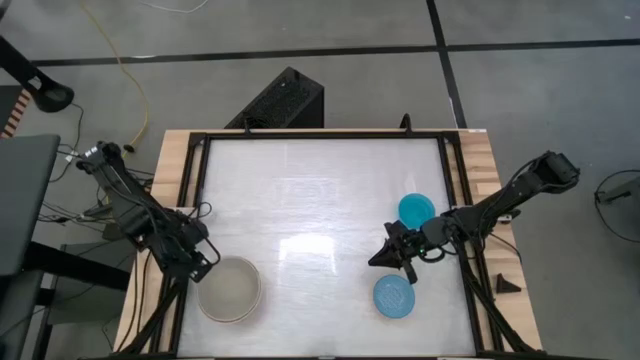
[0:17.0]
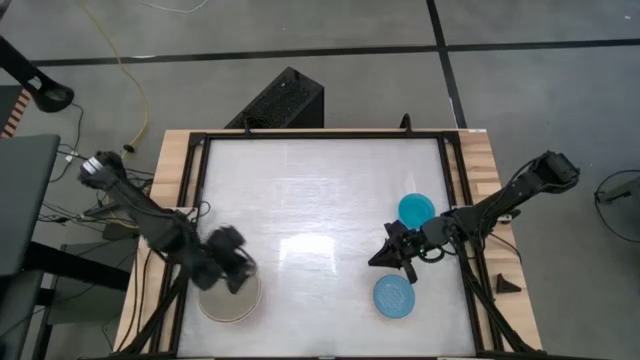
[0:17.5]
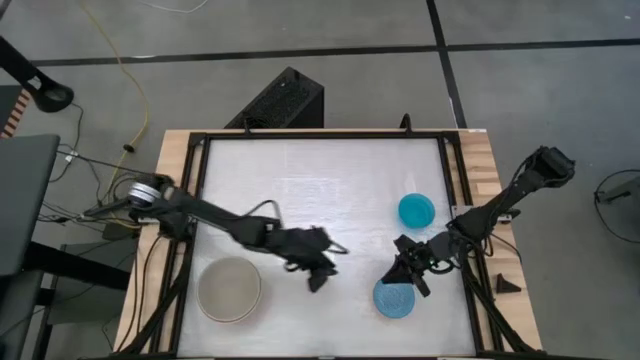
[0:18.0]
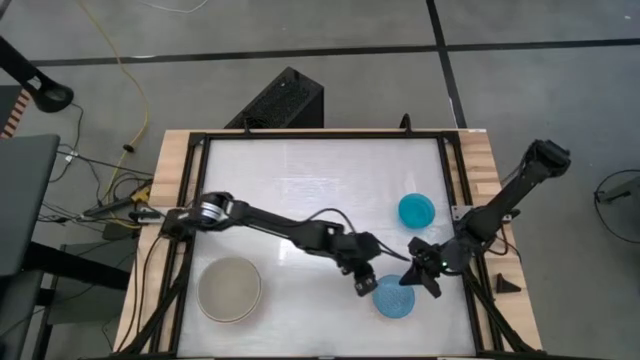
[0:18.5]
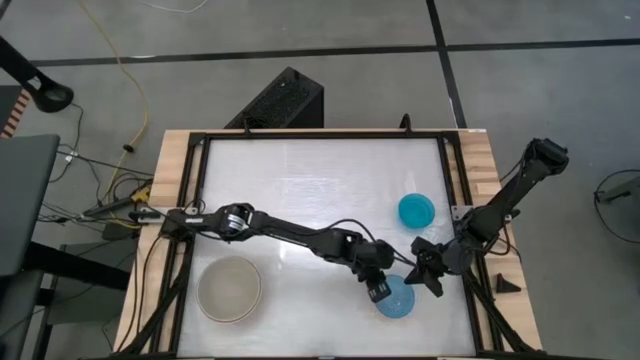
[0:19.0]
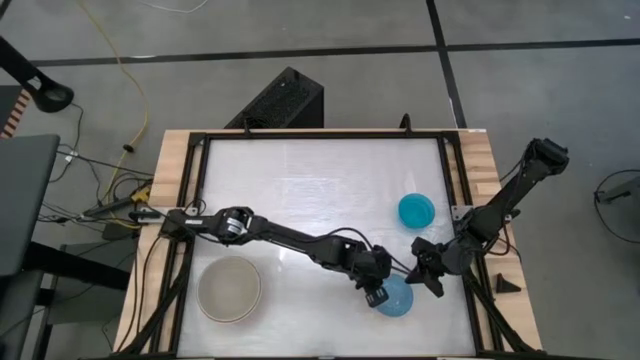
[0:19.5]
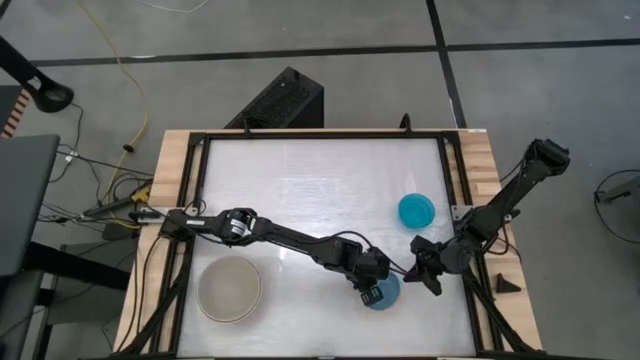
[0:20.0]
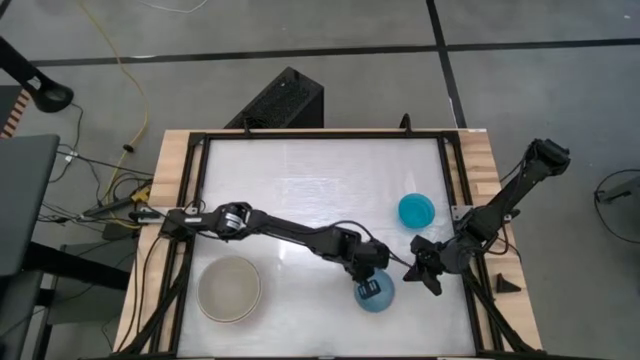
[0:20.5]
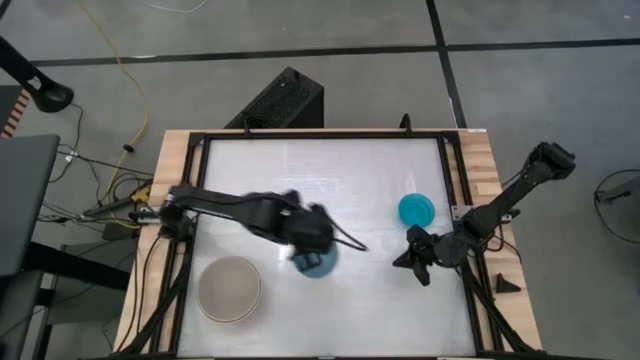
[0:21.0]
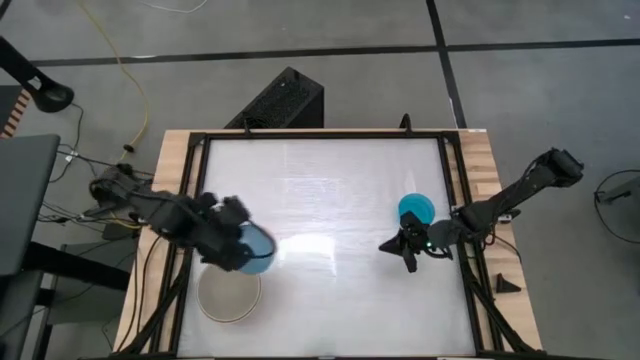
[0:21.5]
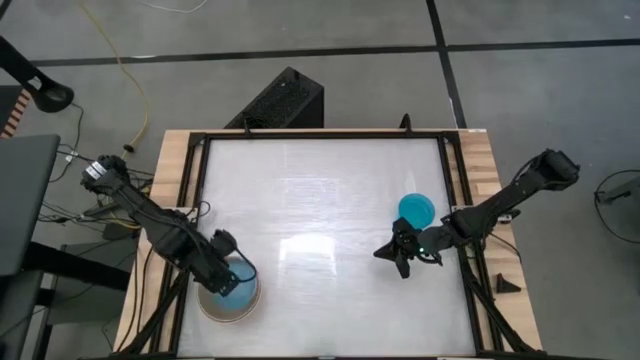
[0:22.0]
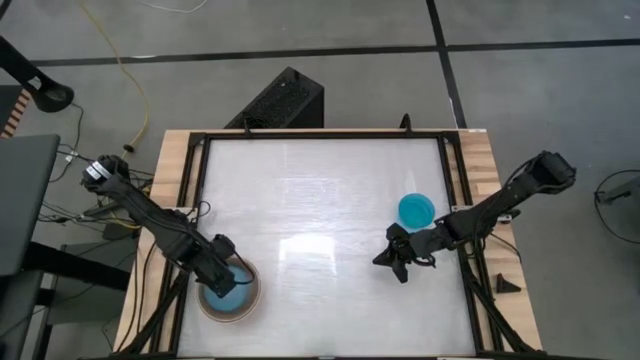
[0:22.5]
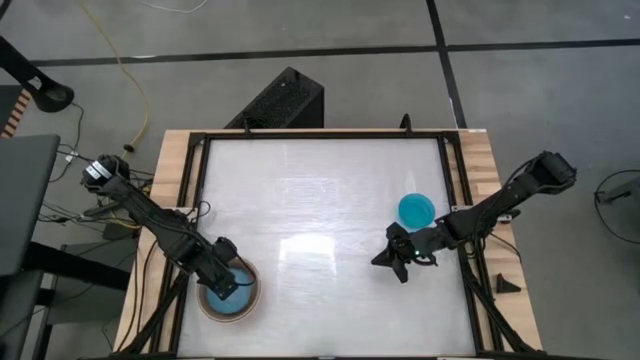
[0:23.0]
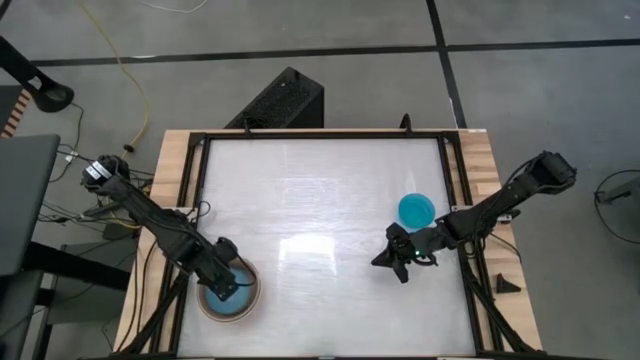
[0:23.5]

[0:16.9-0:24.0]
Stack the blue patterned bowl on top of the gray bowl

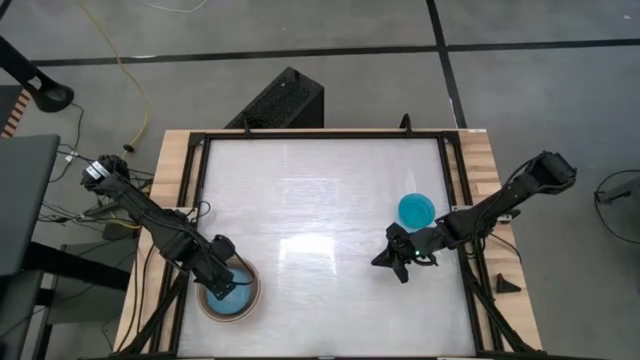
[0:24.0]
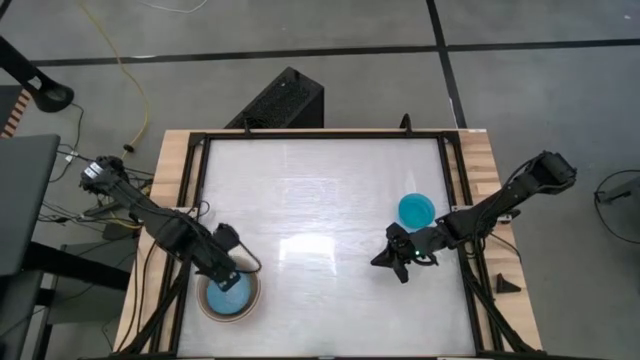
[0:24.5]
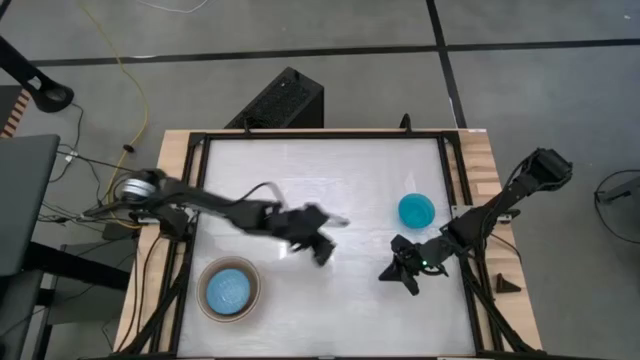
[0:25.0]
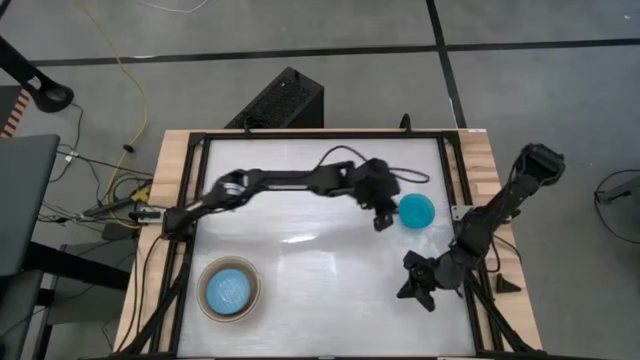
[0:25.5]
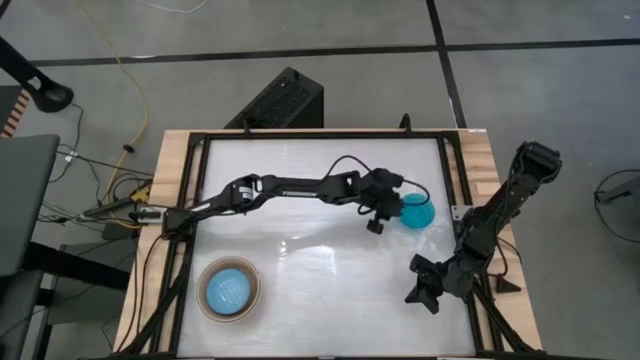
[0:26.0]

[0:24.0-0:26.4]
Stack the blue bowl on top of the blue patterned bowl

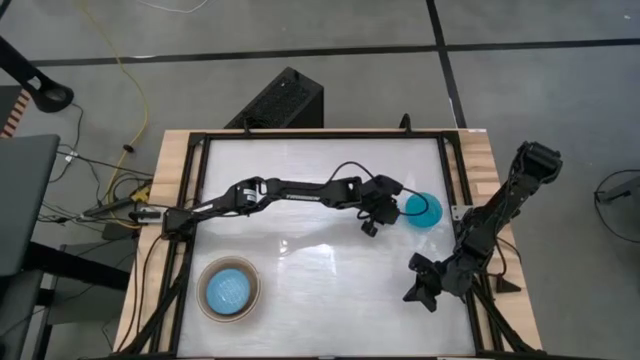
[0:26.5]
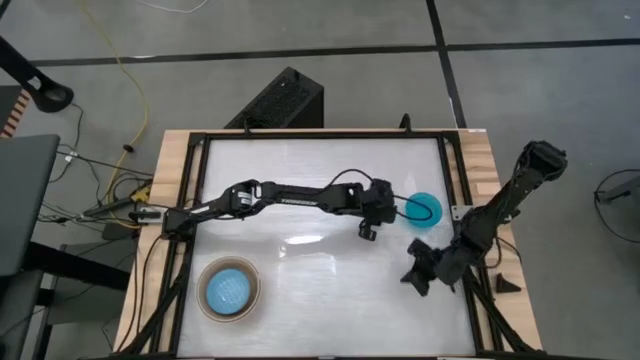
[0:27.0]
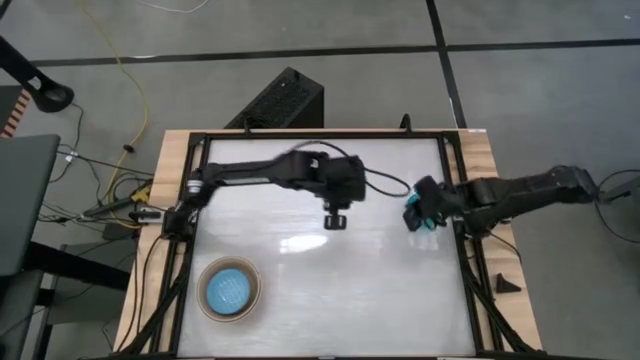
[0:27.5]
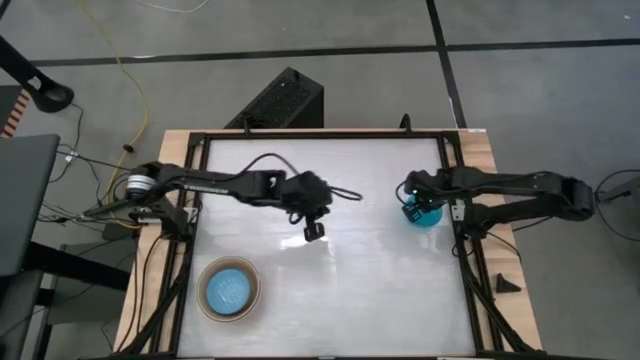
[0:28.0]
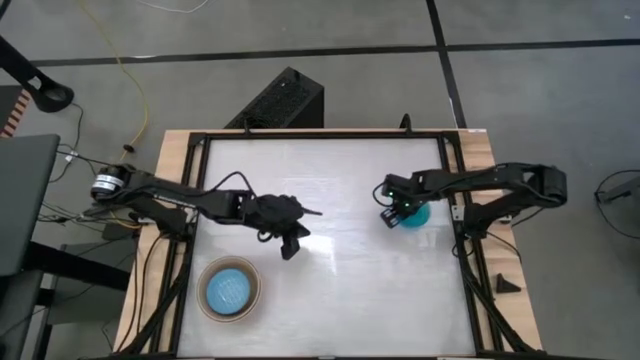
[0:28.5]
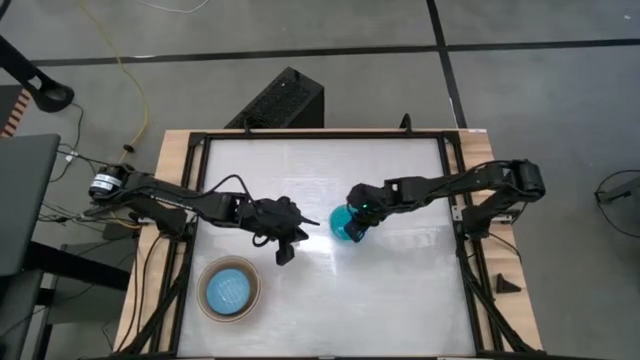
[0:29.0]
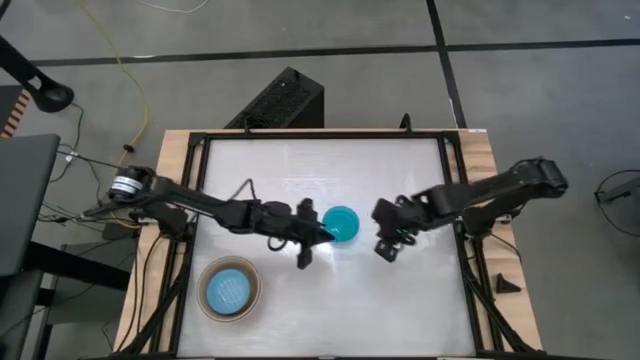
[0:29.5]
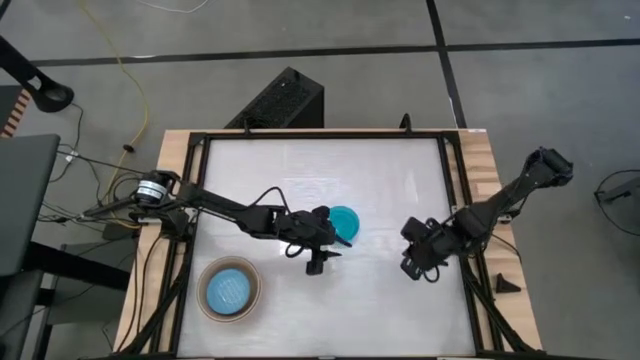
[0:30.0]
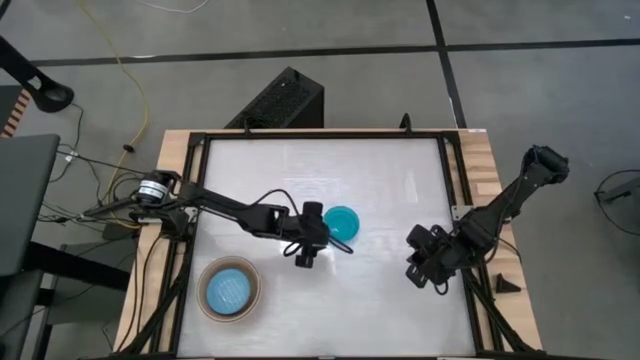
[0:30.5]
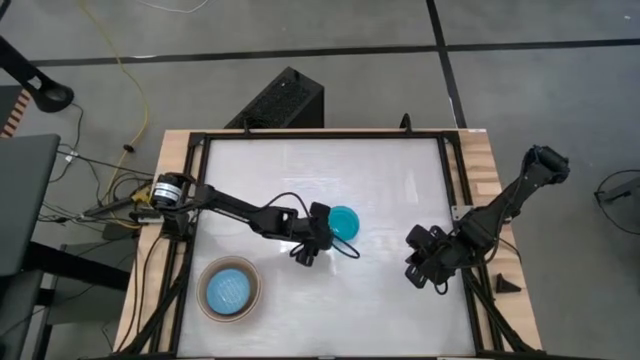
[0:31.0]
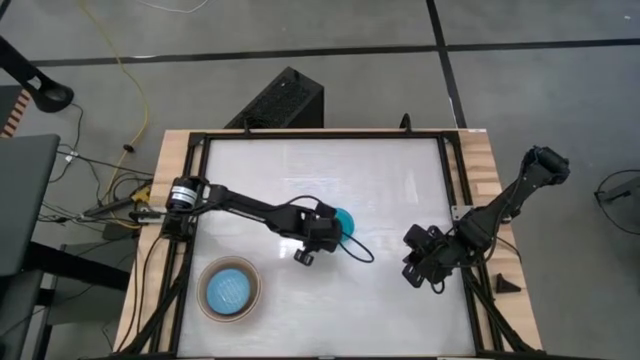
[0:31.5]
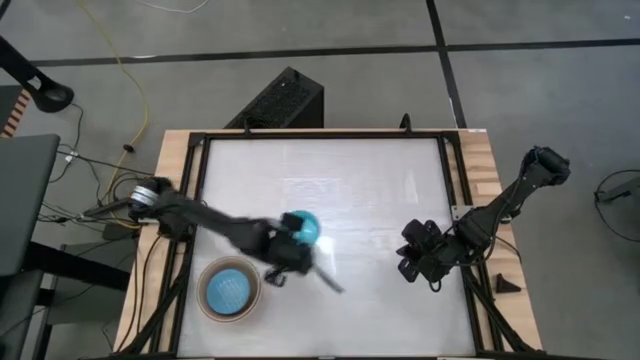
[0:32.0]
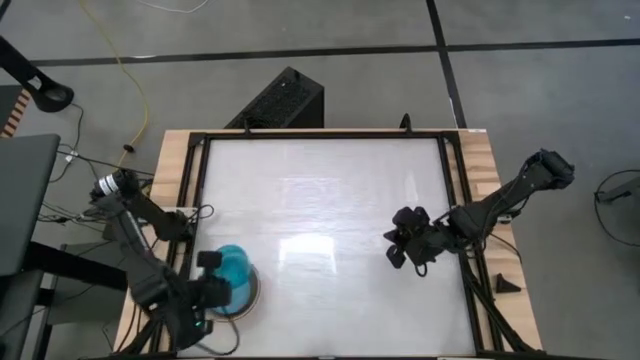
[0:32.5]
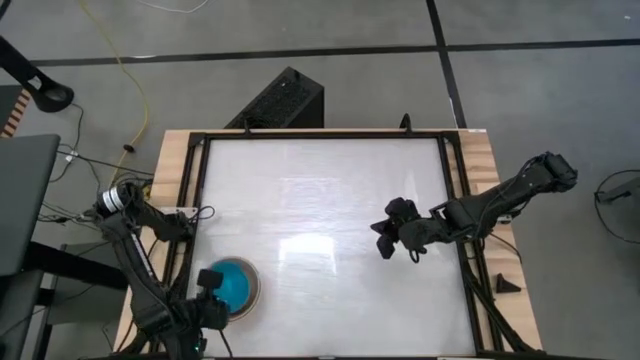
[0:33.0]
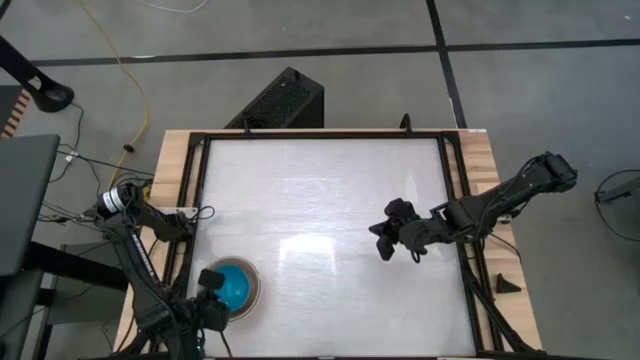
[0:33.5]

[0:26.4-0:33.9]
Stack the blue bowl on top of the blue patterned bowl

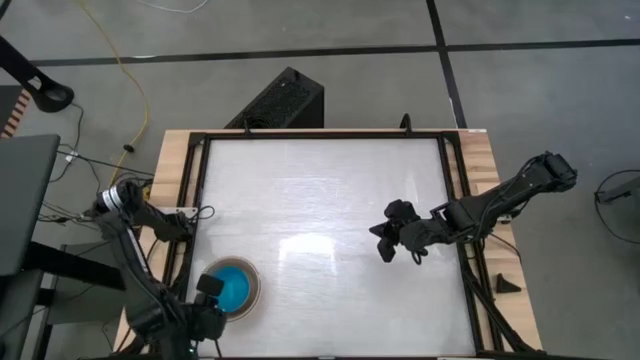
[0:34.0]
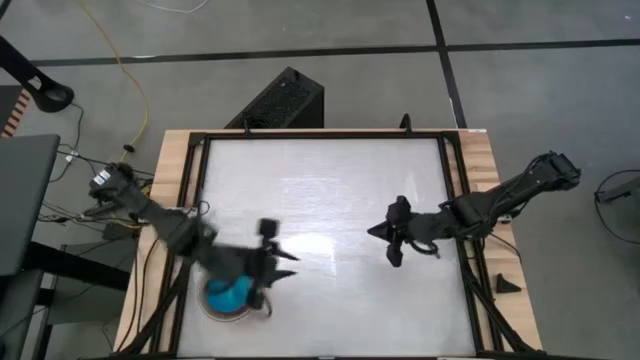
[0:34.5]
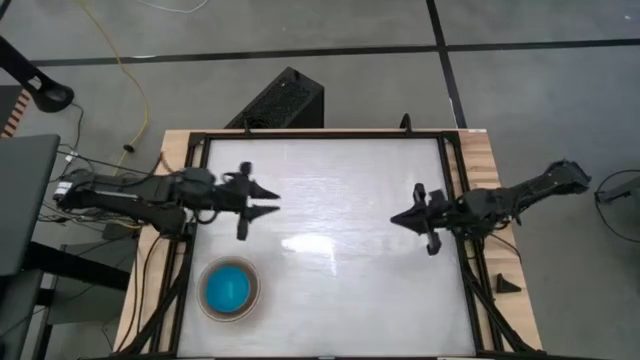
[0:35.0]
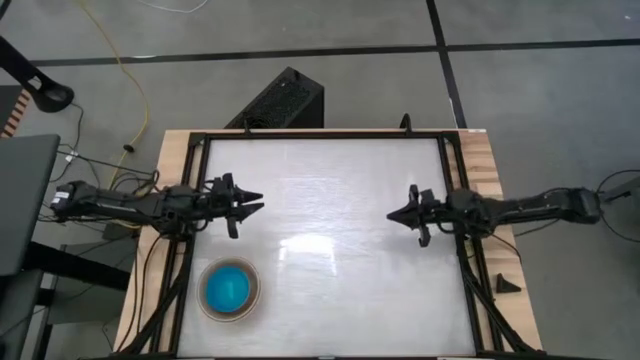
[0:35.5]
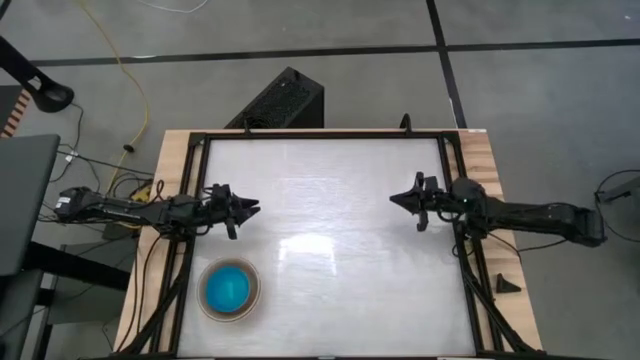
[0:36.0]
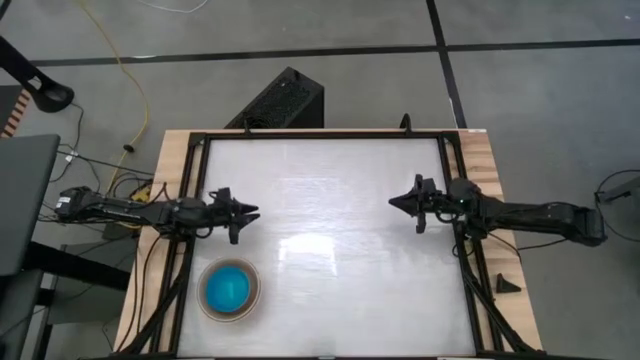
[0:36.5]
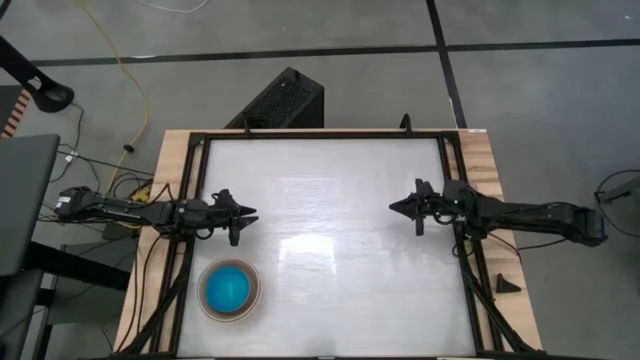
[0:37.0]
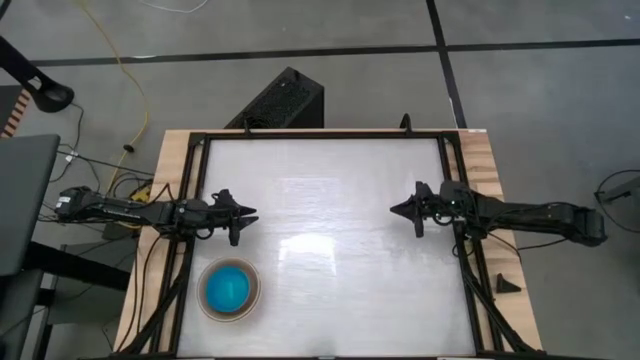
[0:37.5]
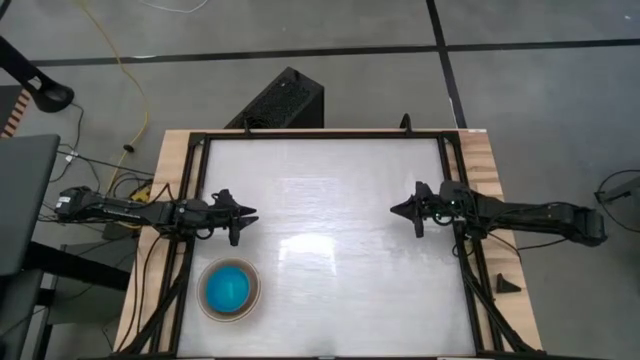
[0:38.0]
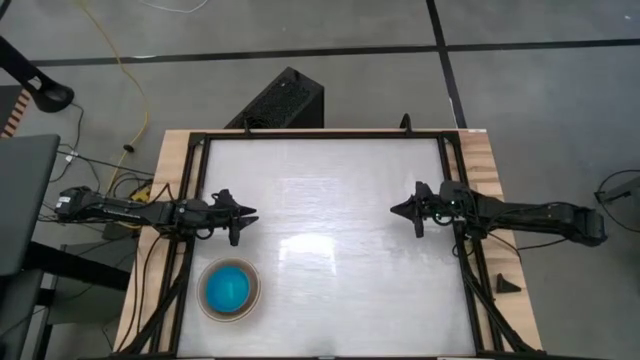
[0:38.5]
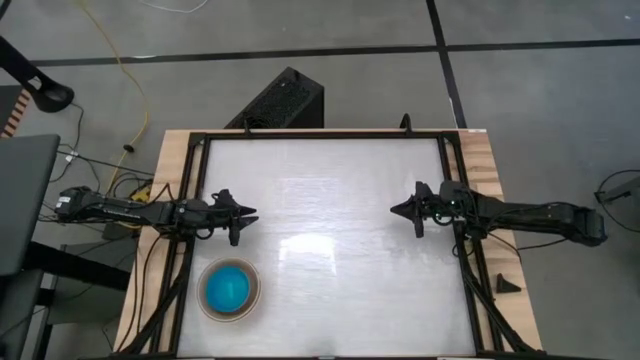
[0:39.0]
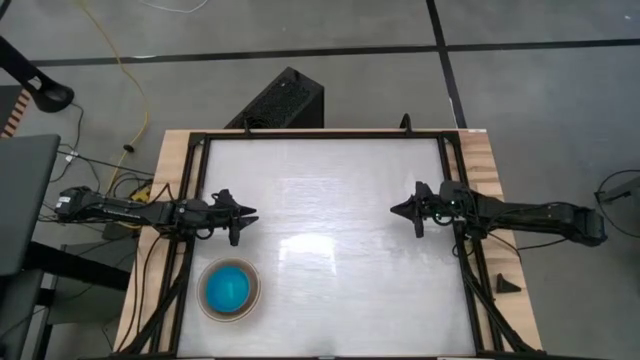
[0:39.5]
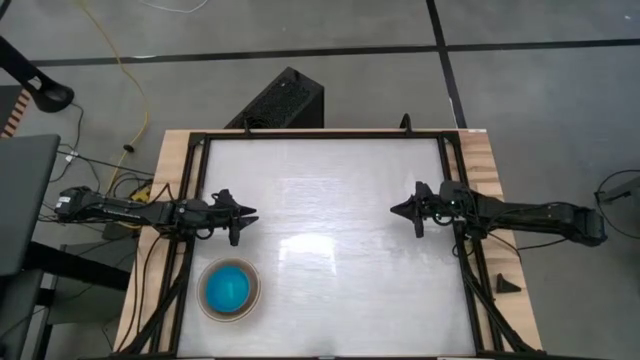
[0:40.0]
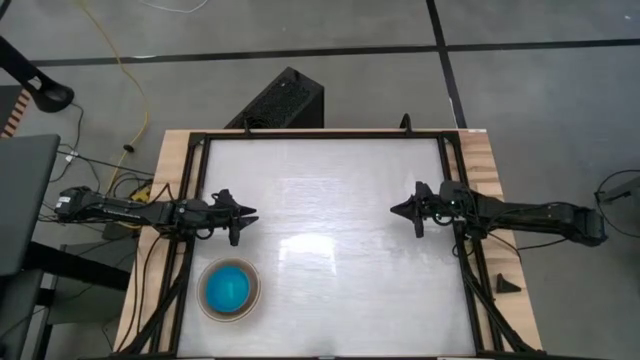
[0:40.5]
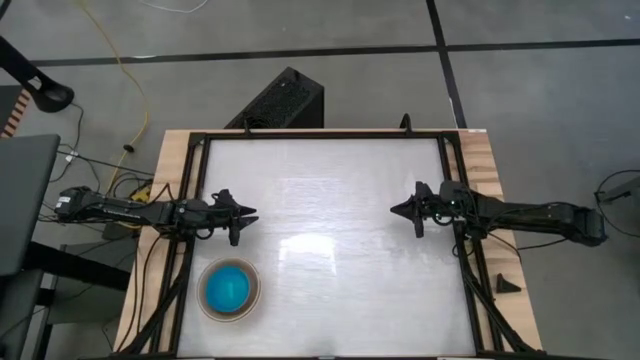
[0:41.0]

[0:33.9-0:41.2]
Return to Home Position
